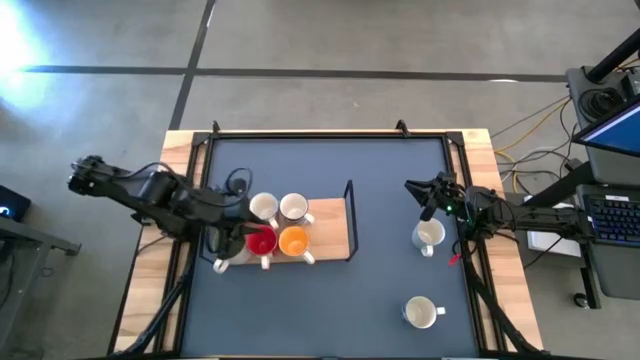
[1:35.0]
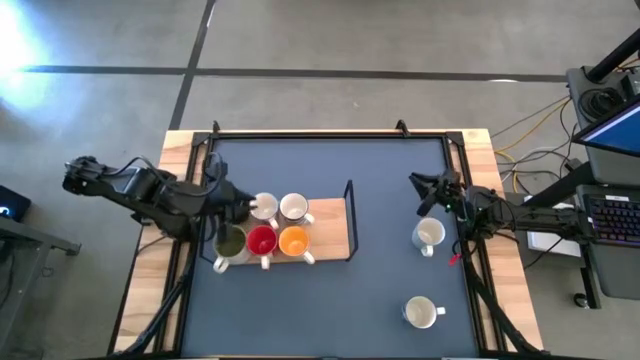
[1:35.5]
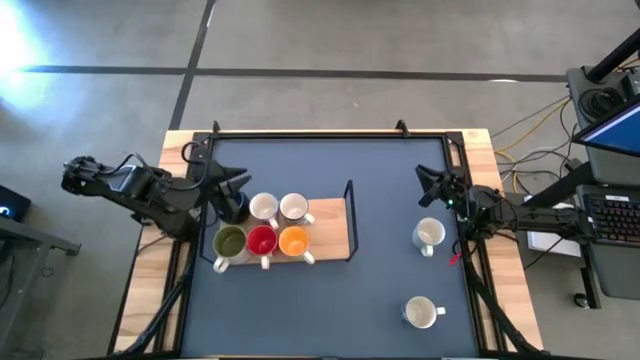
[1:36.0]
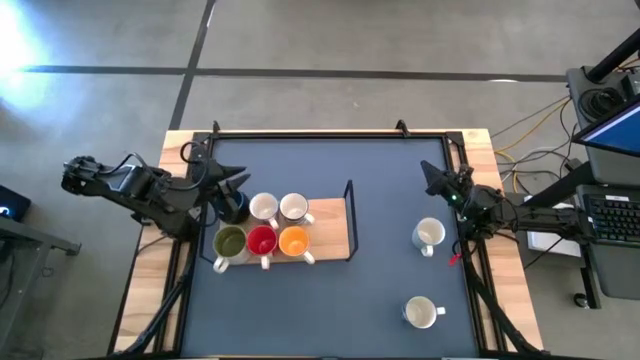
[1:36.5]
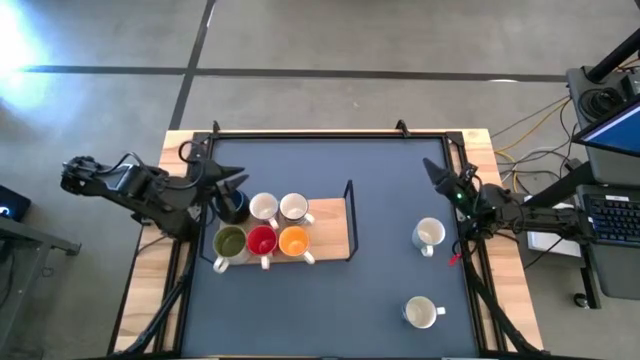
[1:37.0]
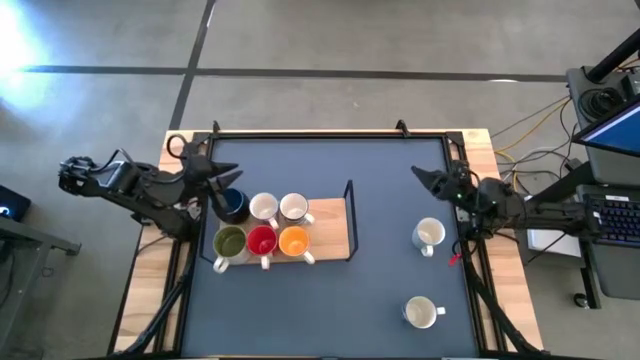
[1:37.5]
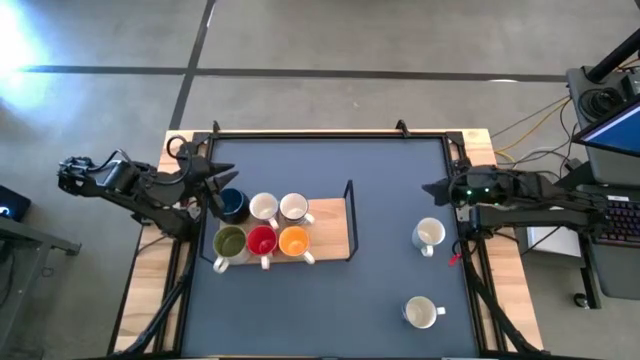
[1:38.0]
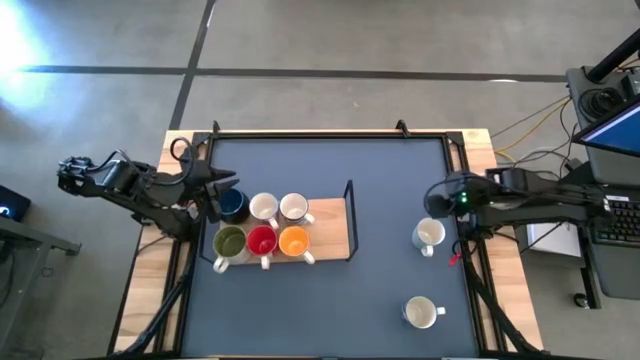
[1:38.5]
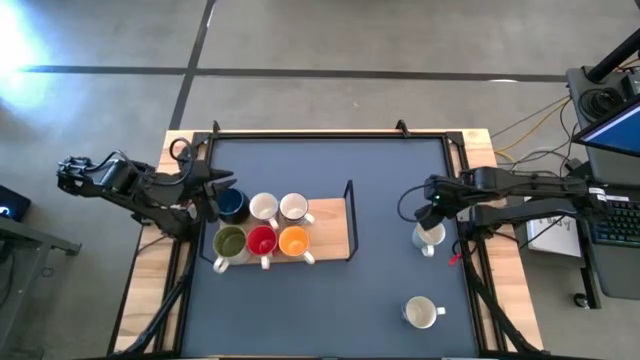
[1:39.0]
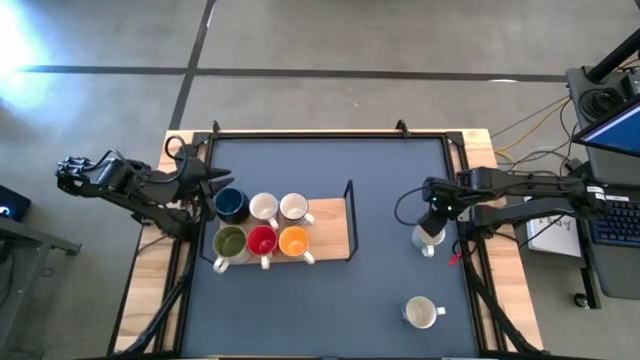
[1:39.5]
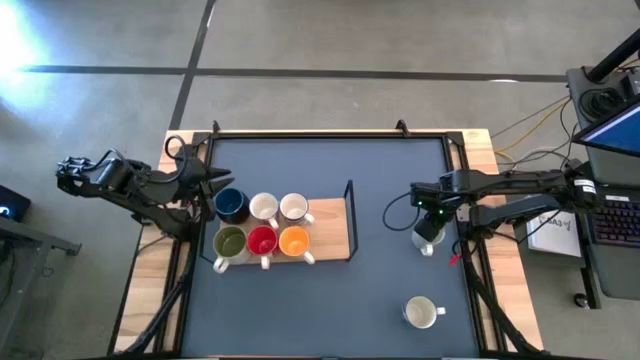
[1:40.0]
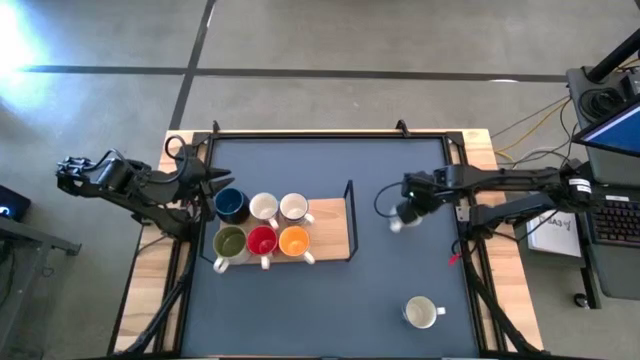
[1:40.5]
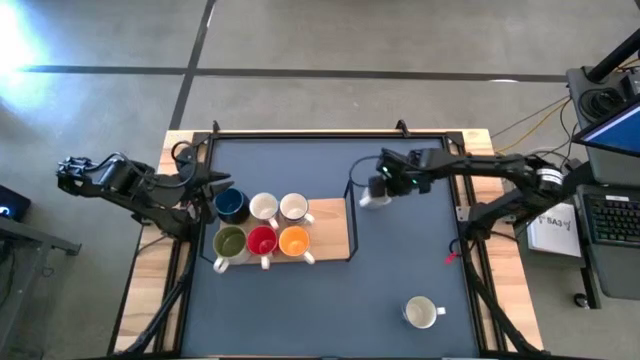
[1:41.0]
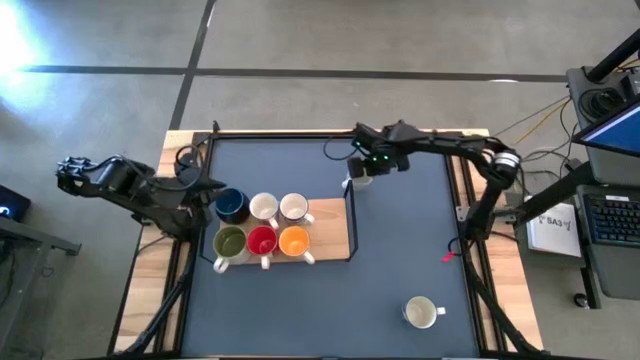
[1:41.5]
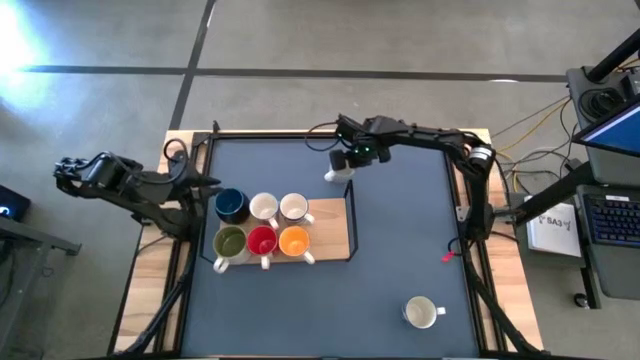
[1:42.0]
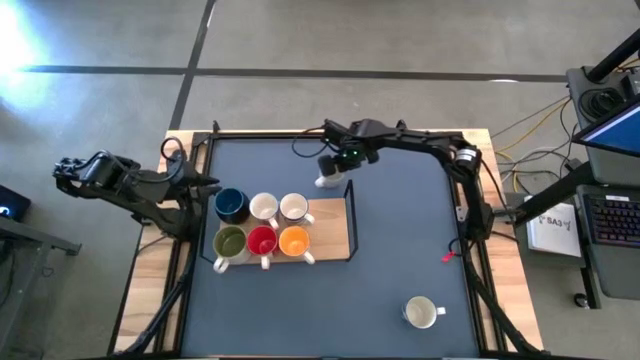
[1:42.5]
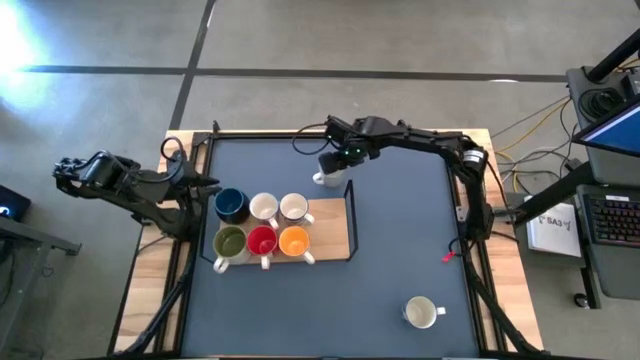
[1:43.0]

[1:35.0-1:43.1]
Task: Place coffee mugs
Move the light green patterned mug to the top right side of the shelf

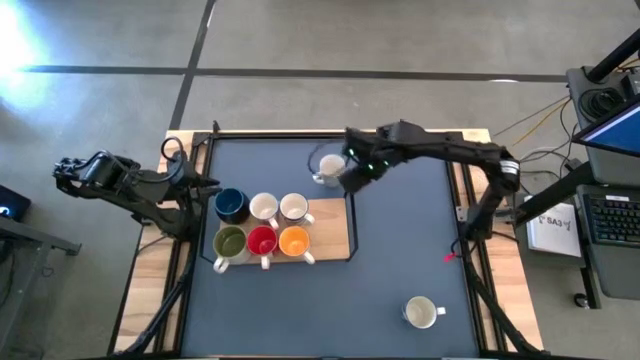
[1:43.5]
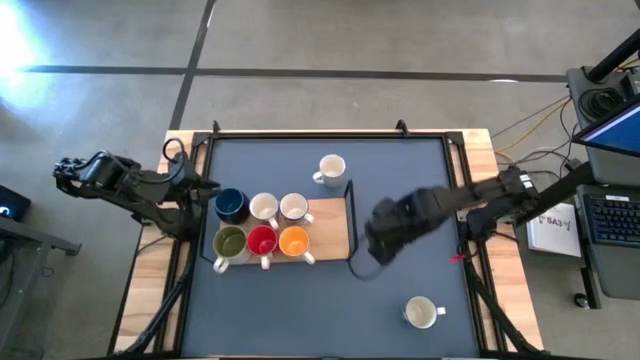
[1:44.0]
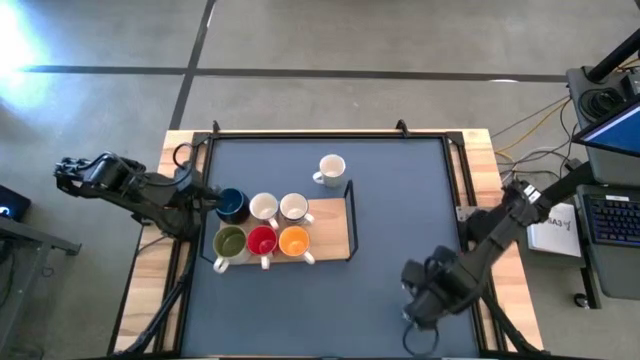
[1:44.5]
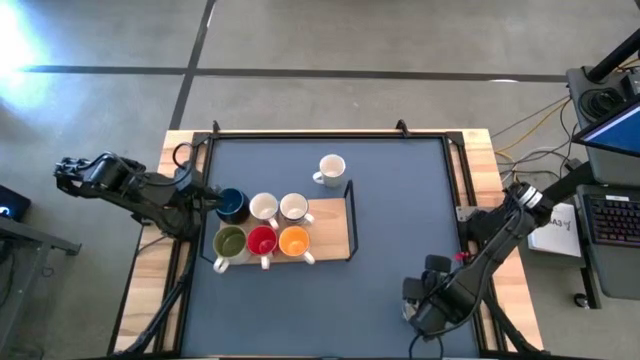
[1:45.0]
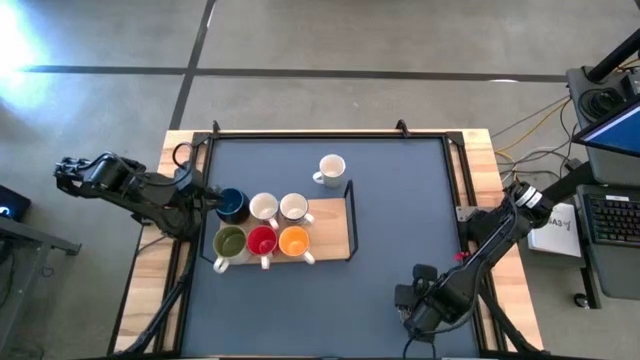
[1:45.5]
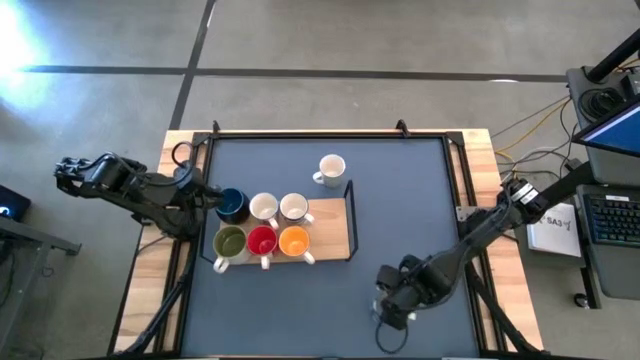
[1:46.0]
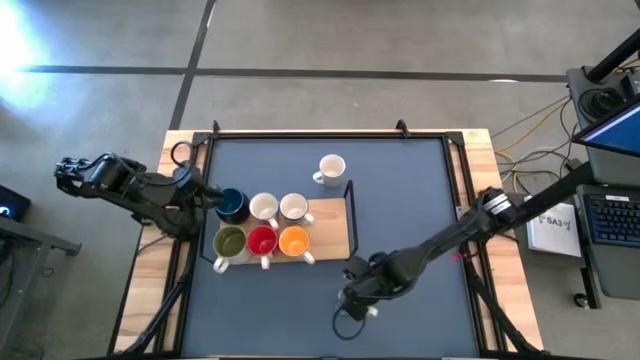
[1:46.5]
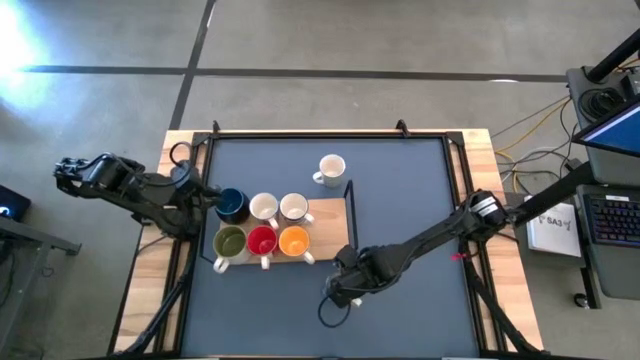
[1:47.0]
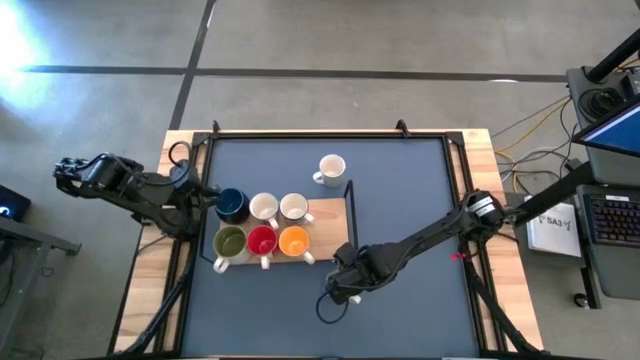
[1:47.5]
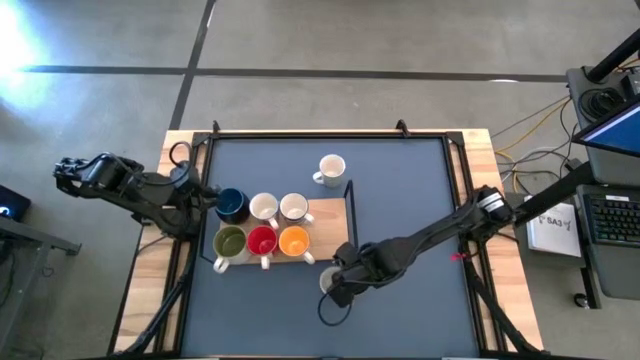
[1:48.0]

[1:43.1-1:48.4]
Move the white blue patterned mug to the bottom right side of the shelf

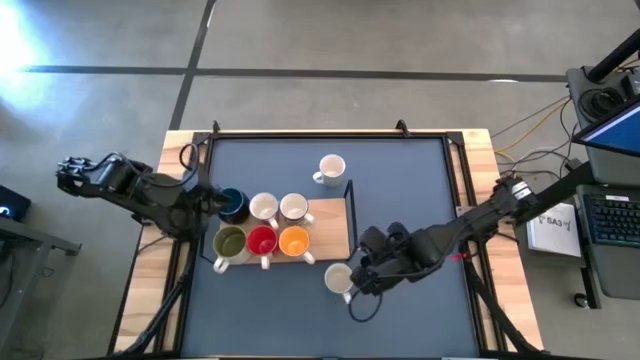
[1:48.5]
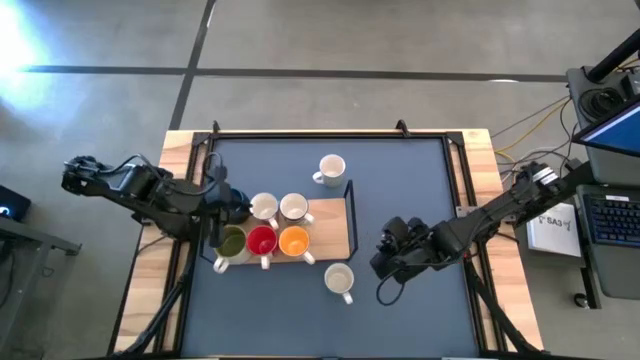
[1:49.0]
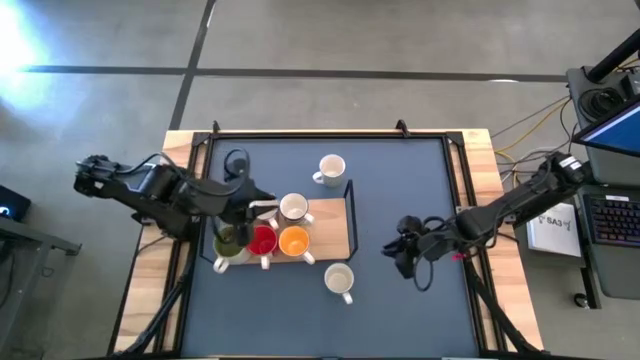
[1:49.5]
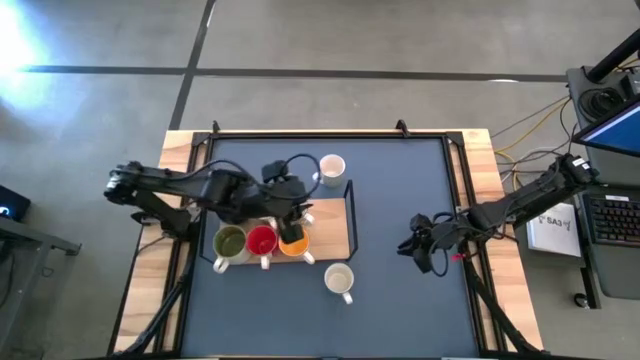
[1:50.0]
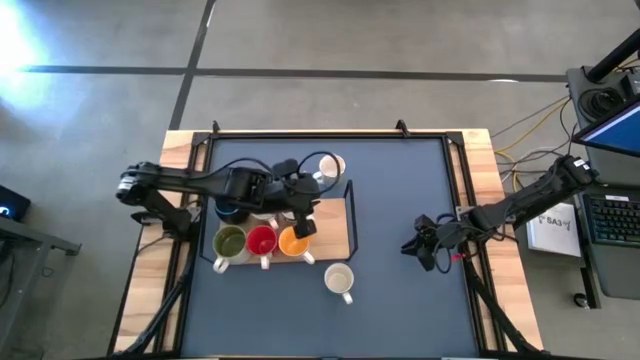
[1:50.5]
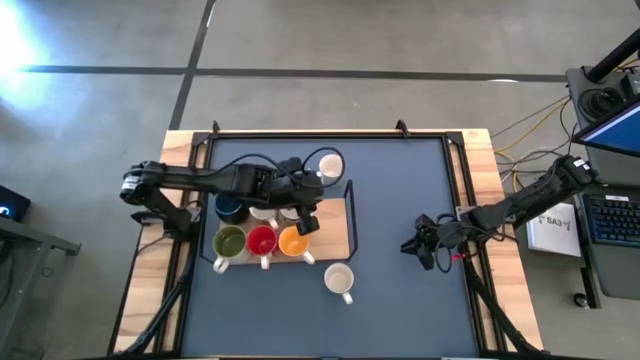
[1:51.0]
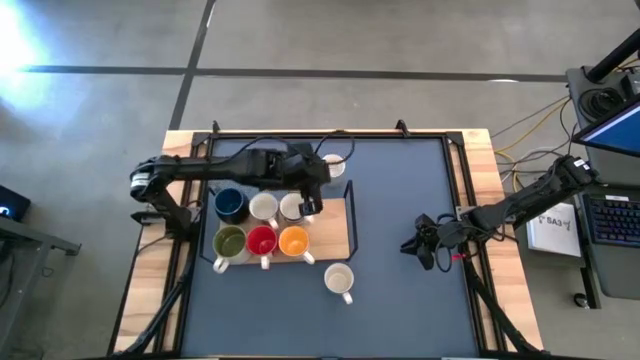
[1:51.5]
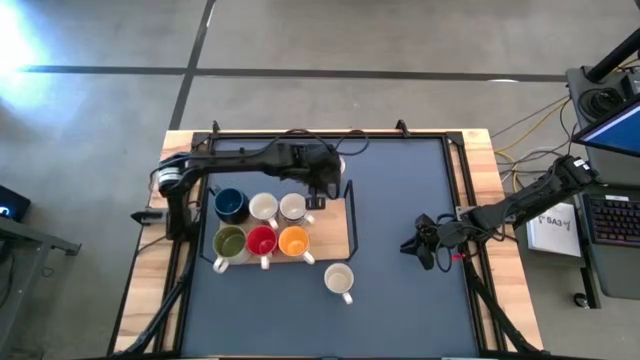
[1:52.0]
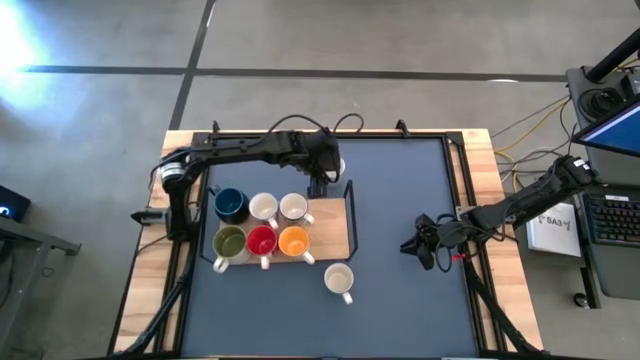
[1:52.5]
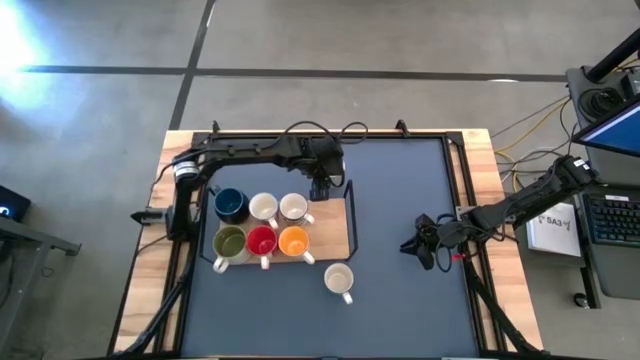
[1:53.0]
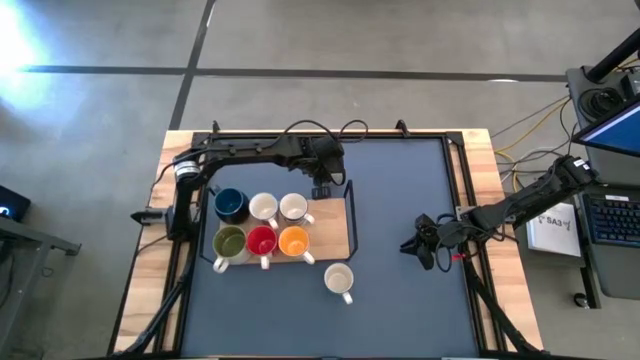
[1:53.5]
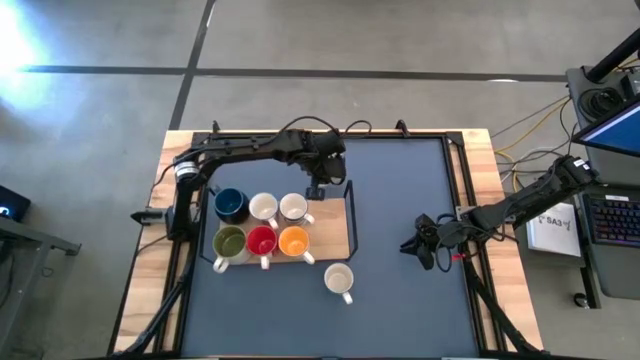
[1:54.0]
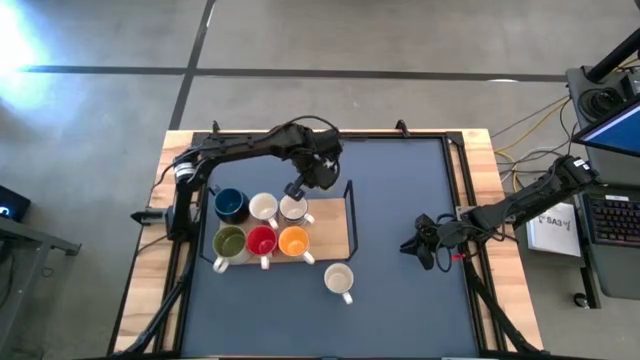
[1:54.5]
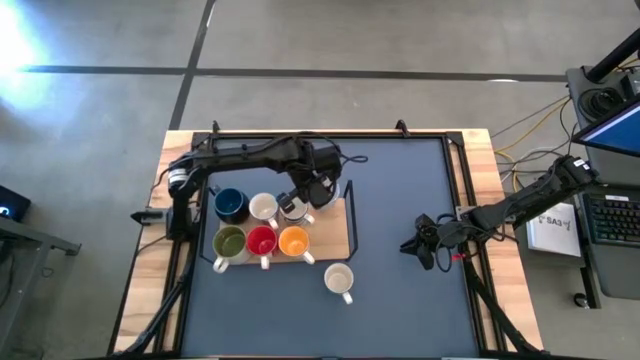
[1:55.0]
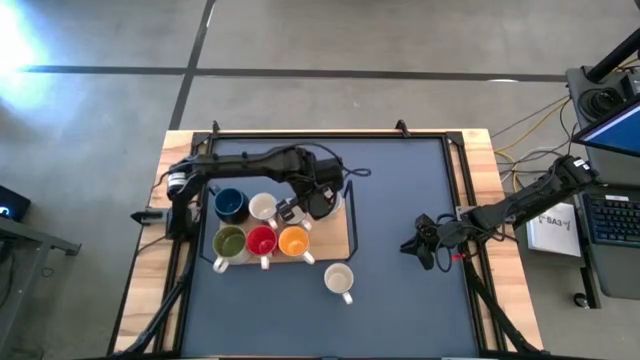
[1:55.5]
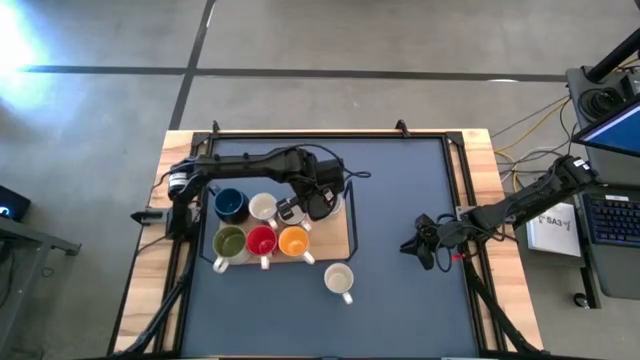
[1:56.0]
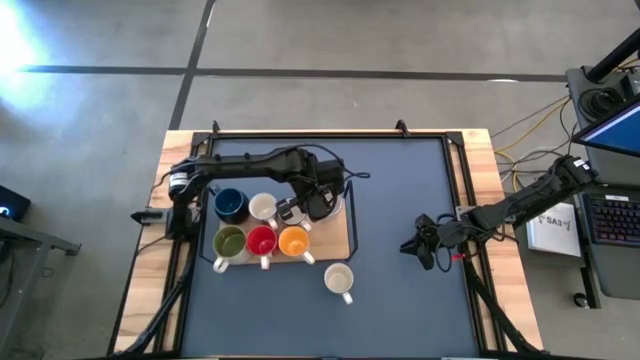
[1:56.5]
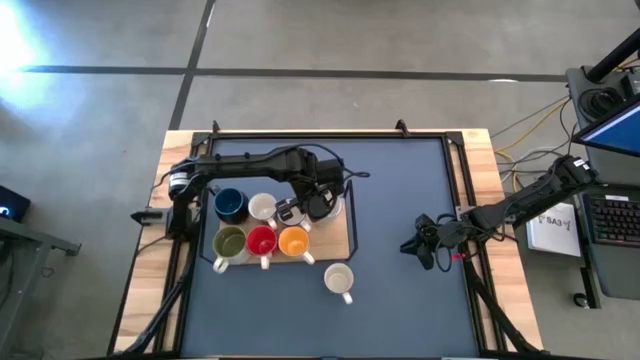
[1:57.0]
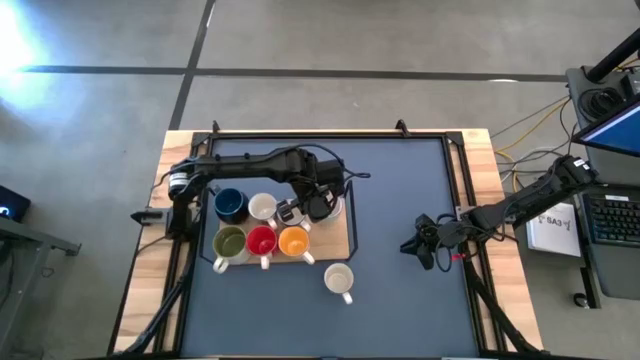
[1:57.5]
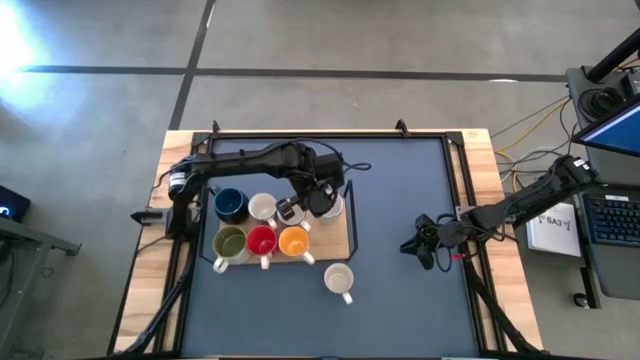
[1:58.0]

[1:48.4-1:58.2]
Put the light green patterned mug on the shelf
